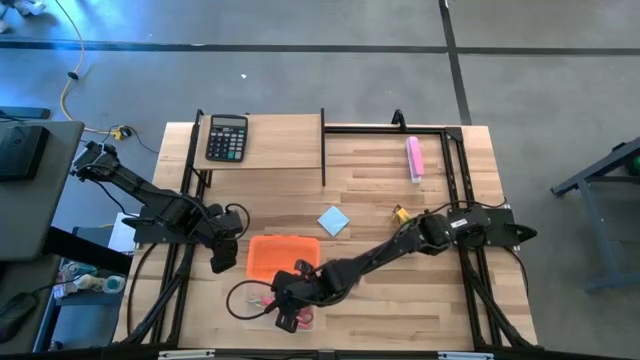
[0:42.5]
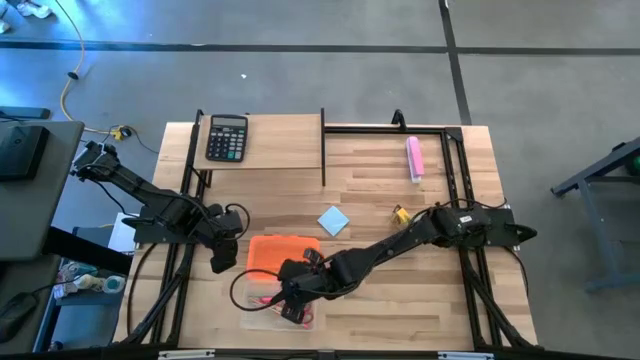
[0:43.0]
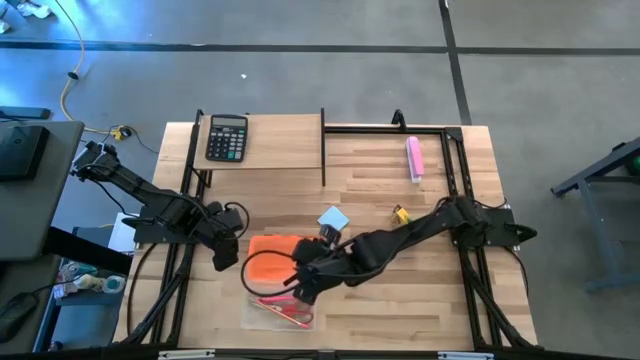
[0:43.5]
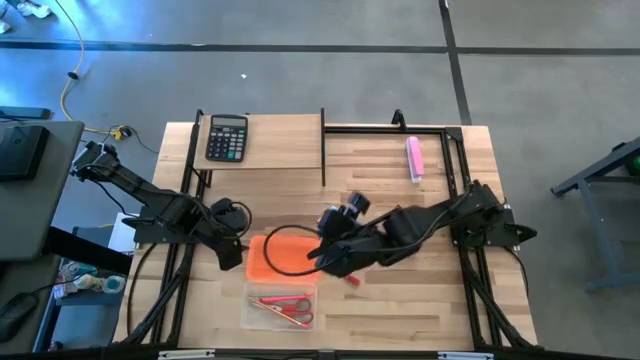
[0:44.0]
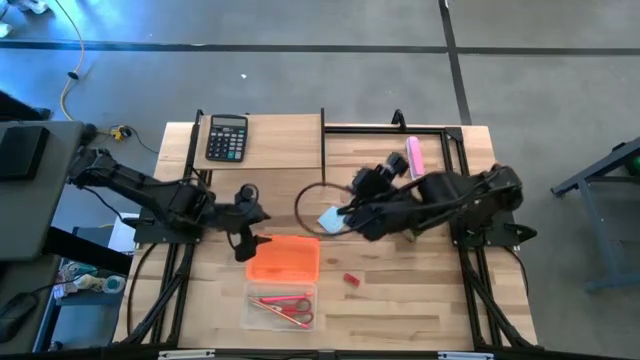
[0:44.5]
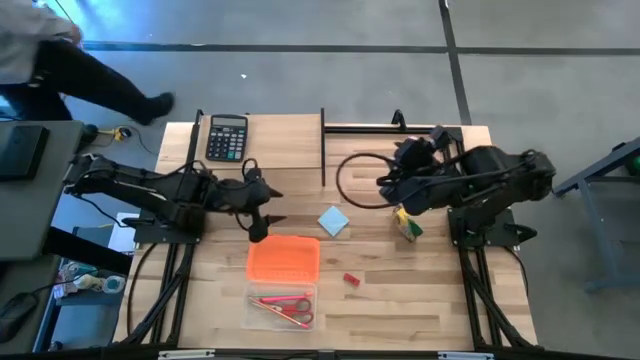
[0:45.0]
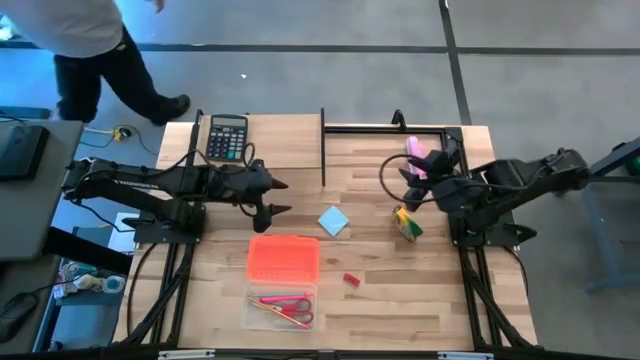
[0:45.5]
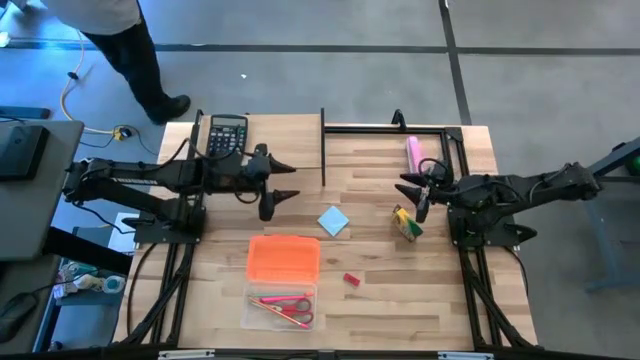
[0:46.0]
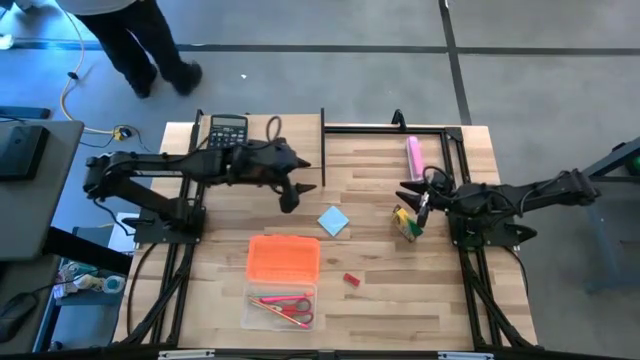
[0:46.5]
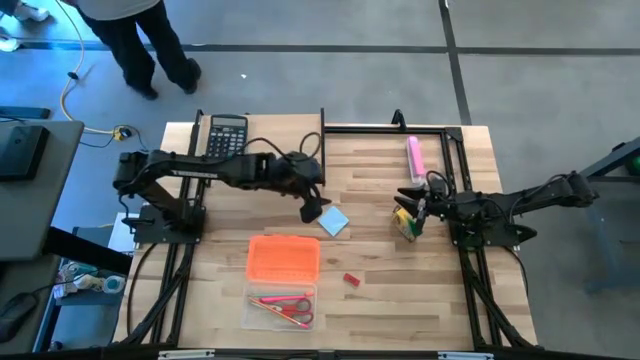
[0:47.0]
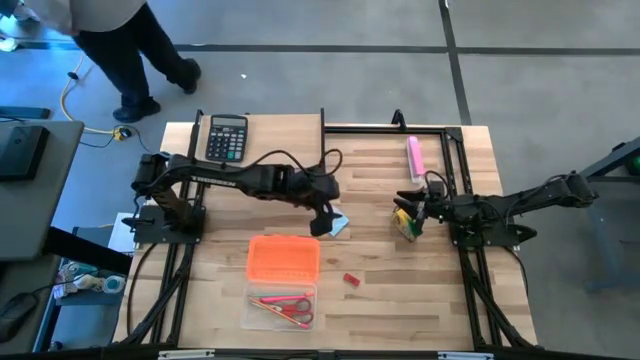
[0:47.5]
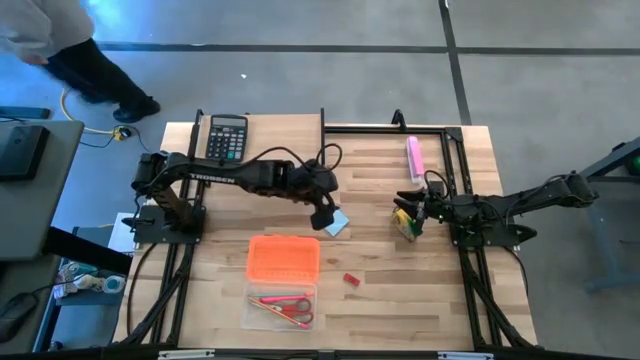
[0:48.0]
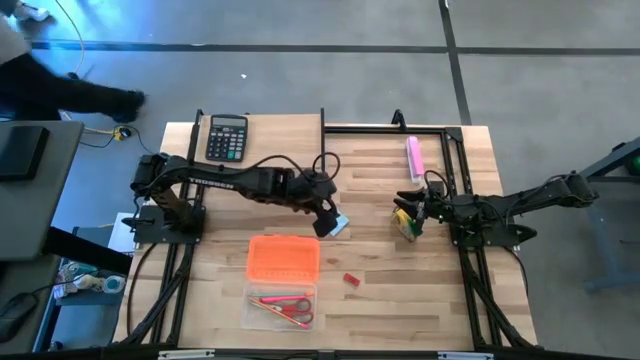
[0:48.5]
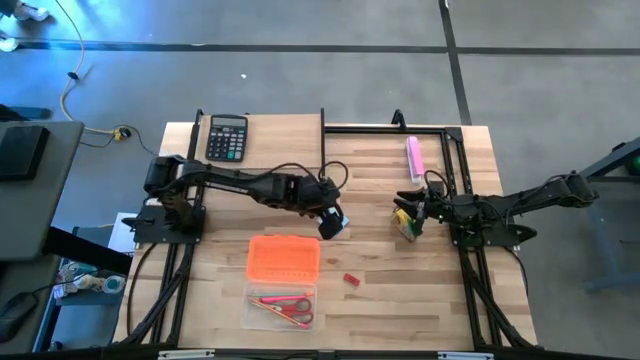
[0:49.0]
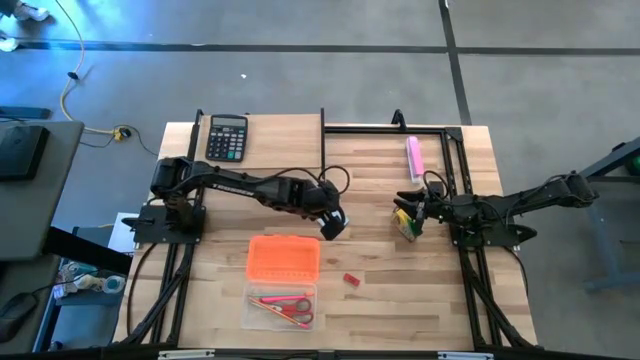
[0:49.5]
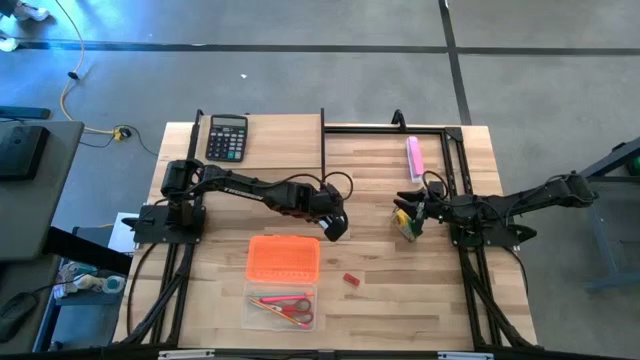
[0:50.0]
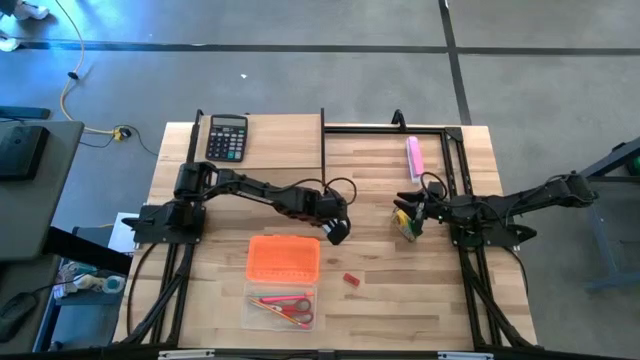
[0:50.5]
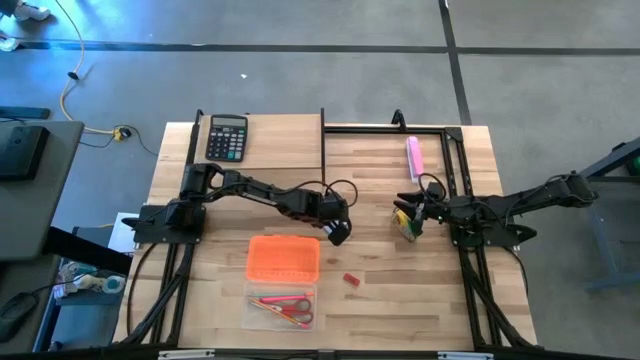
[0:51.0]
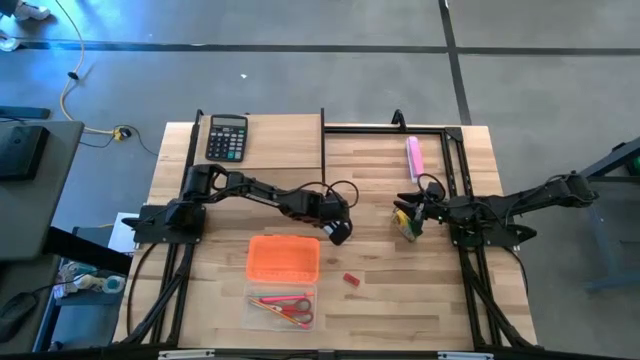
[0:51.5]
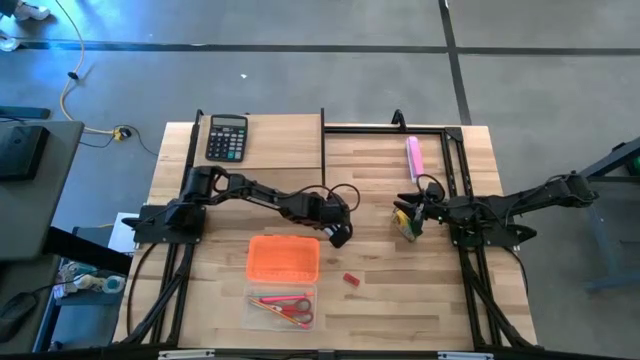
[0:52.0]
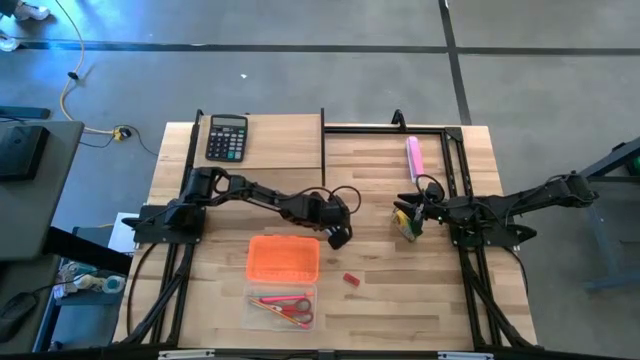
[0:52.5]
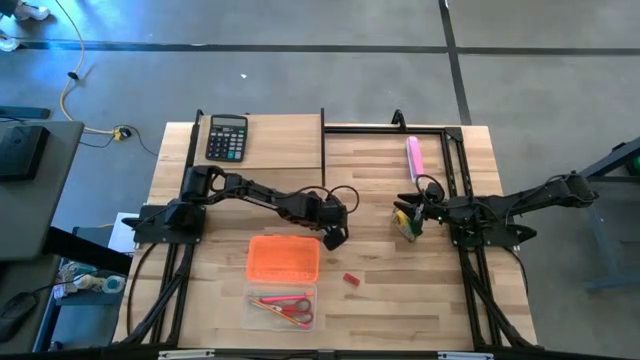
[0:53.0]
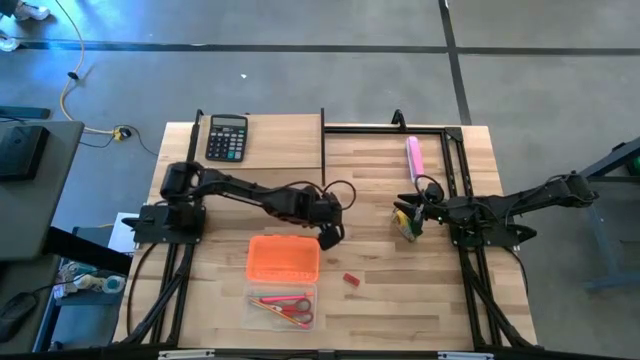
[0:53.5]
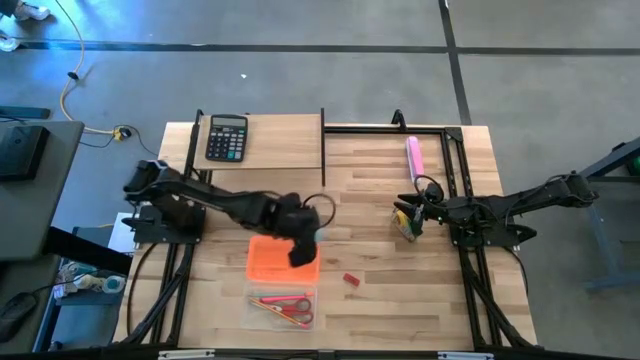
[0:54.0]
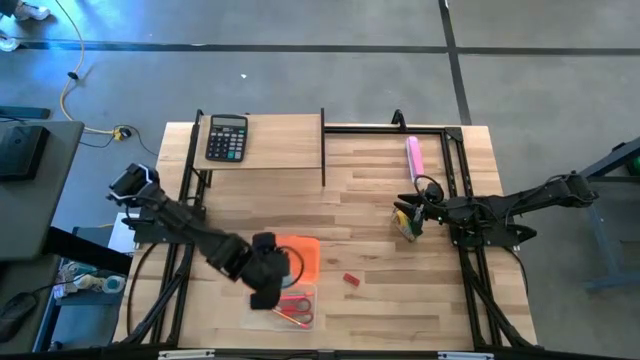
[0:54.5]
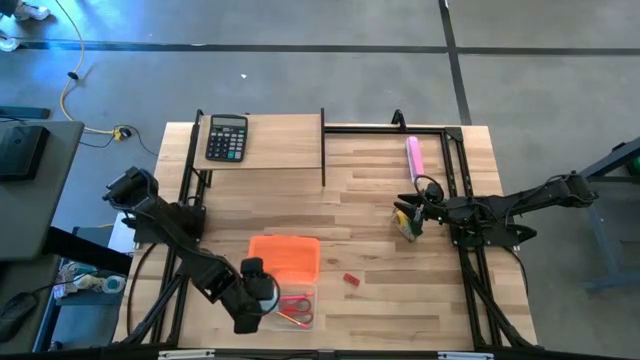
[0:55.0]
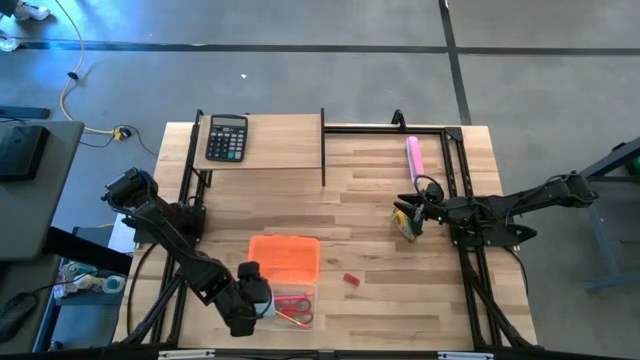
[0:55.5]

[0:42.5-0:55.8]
Task: Pack school essentials
Put the blue sticky notes in the orange supply box

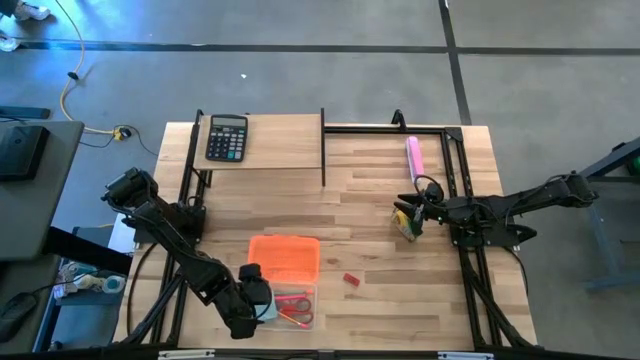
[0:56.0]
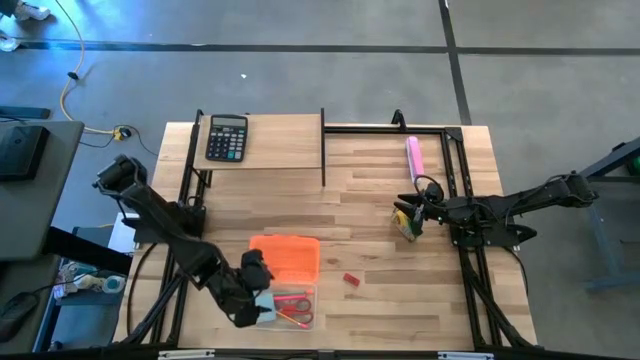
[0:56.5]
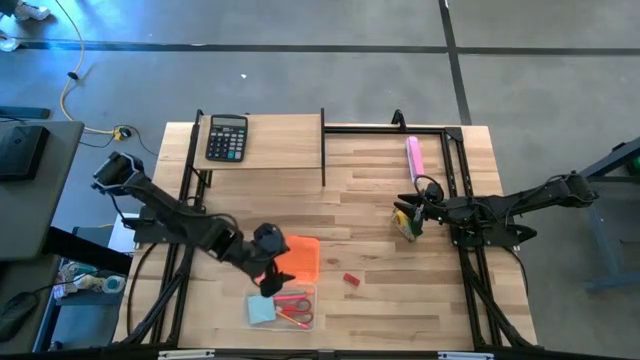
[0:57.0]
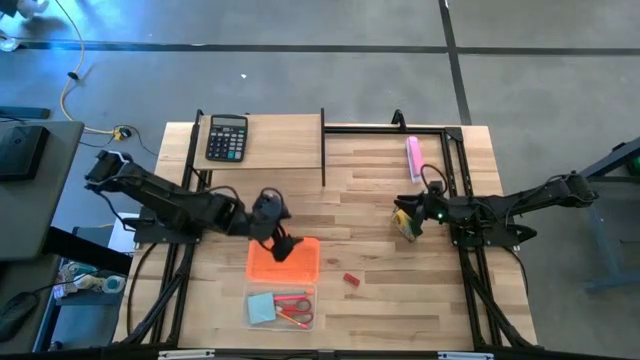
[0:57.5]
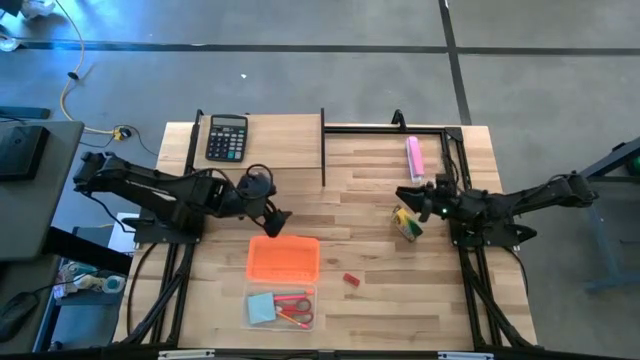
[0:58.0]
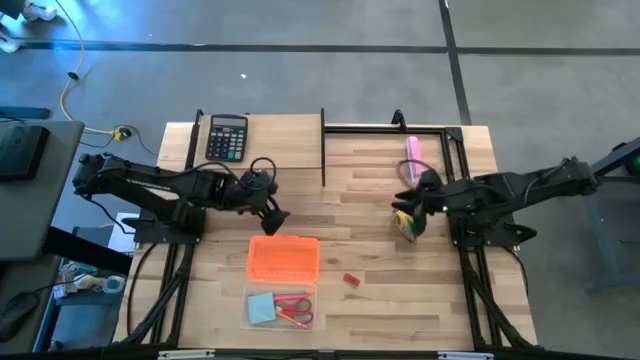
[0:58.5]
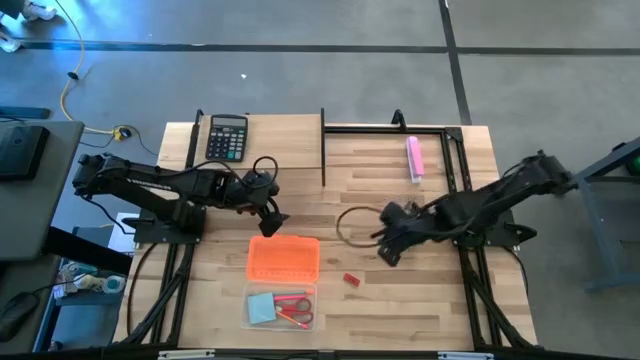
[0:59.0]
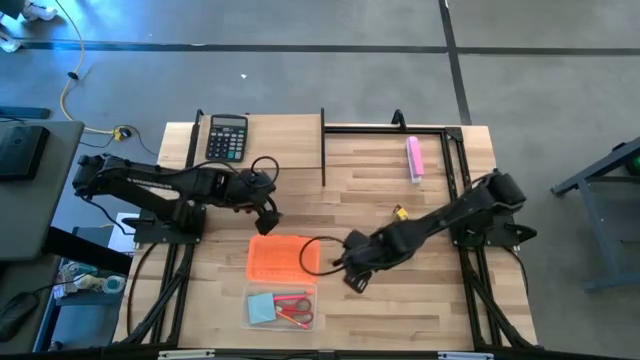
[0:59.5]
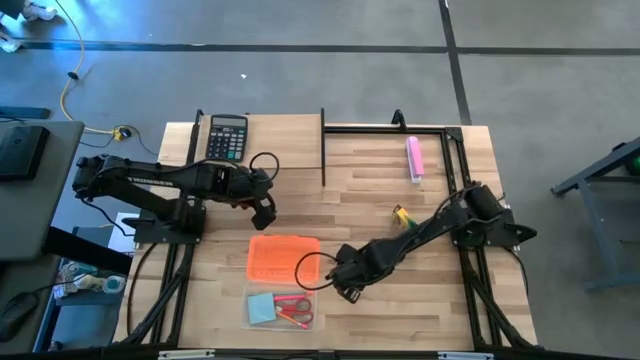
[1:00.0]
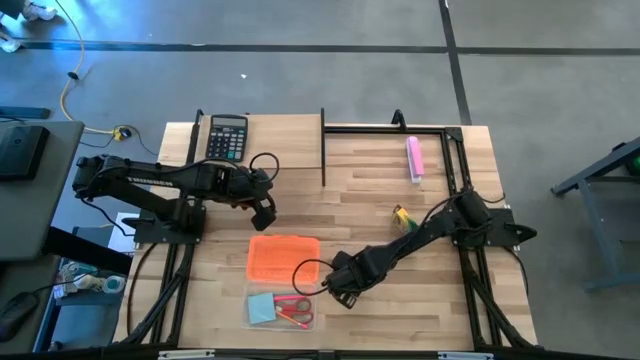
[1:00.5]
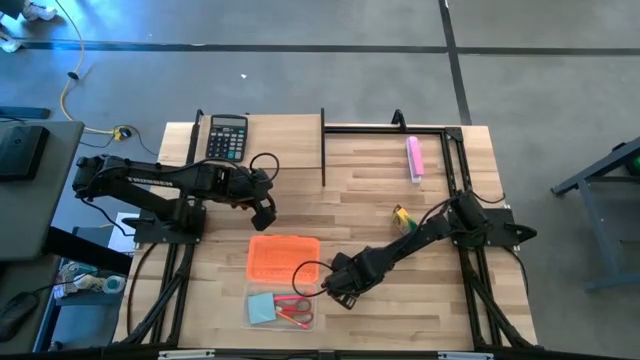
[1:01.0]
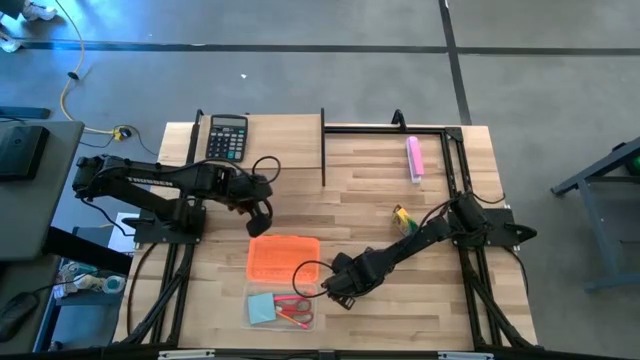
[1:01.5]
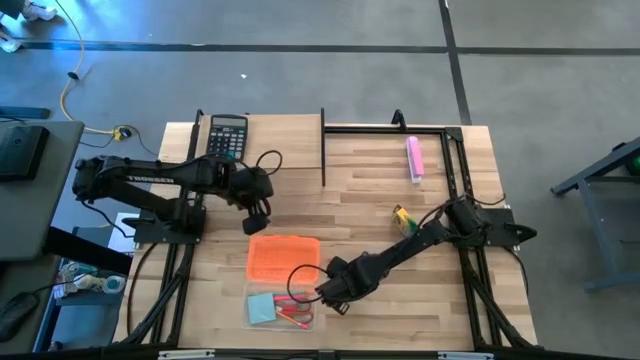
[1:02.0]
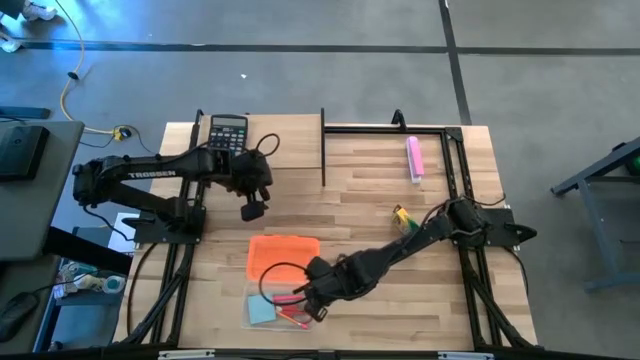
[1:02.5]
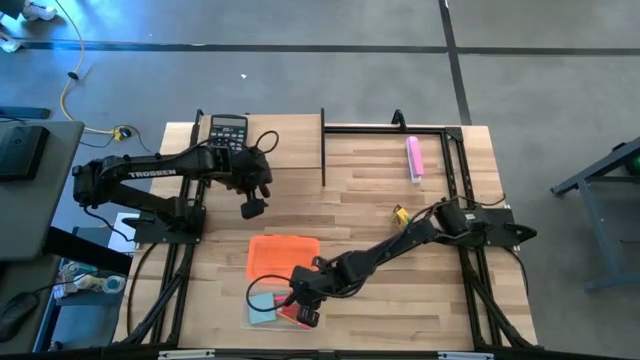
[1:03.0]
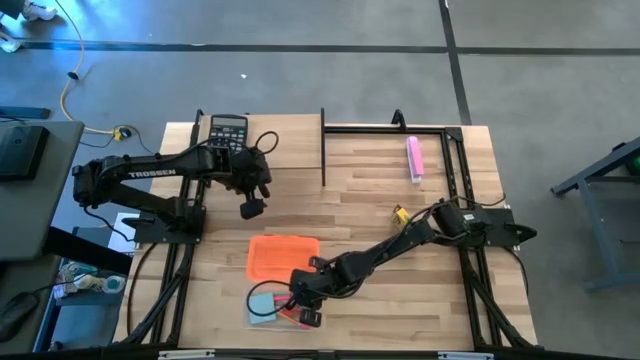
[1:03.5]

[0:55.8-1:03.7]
Put the red eraser in the orange supply box
